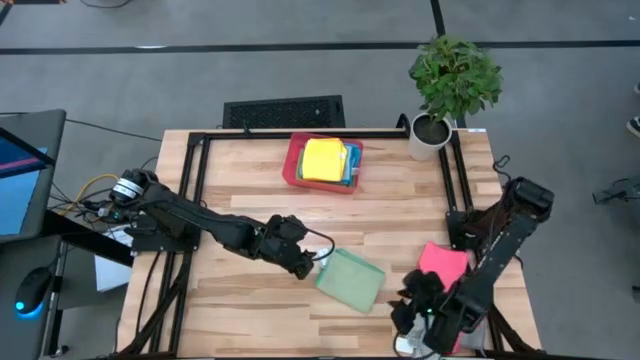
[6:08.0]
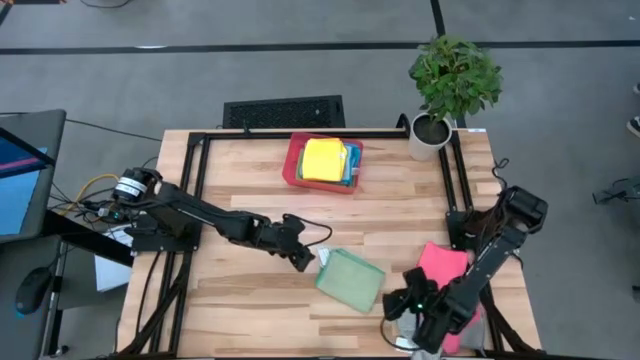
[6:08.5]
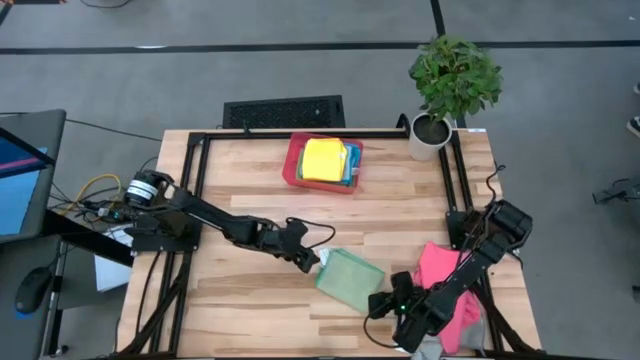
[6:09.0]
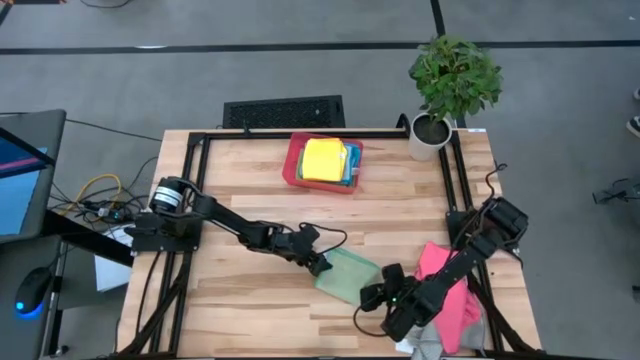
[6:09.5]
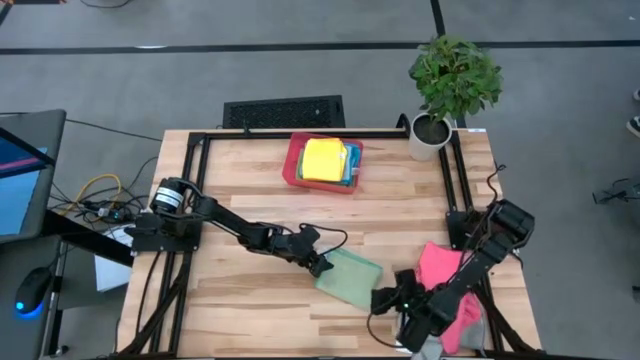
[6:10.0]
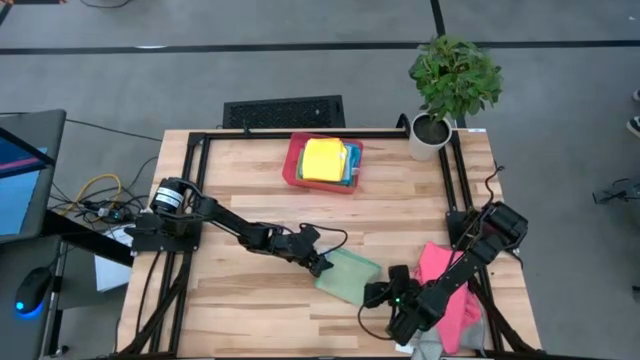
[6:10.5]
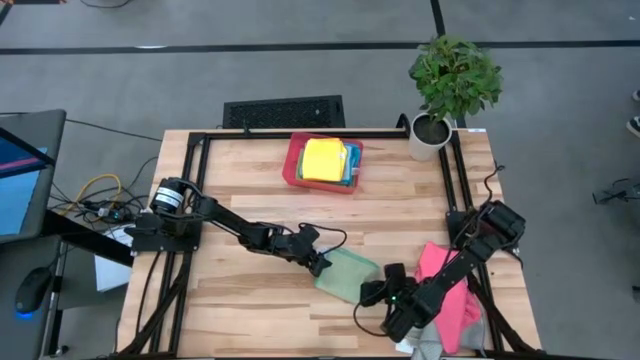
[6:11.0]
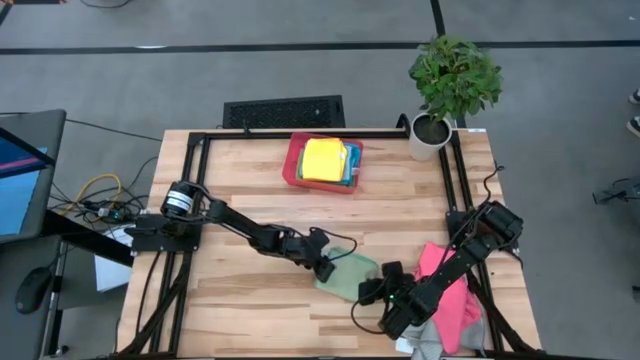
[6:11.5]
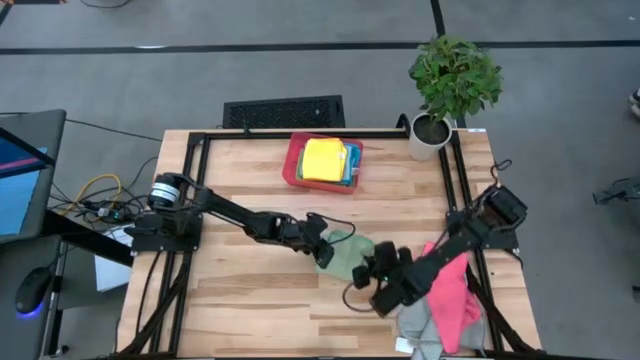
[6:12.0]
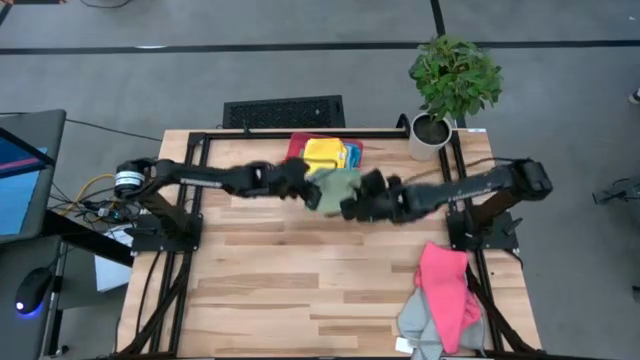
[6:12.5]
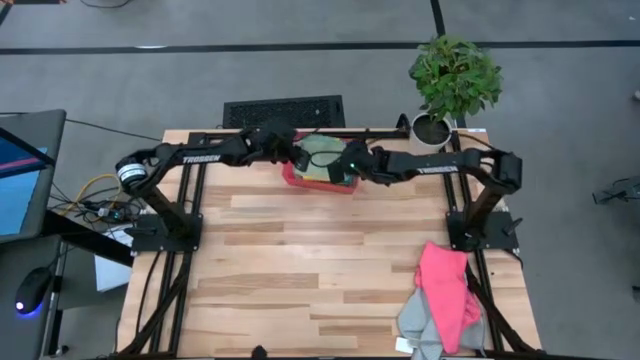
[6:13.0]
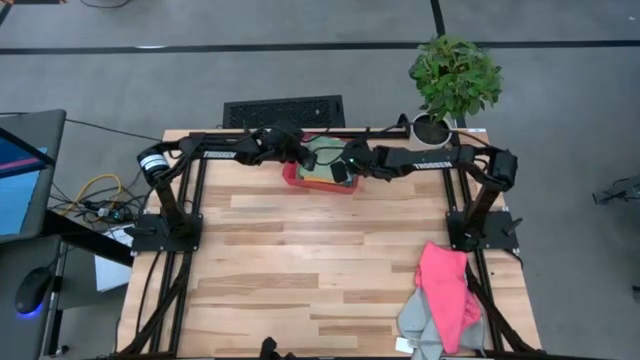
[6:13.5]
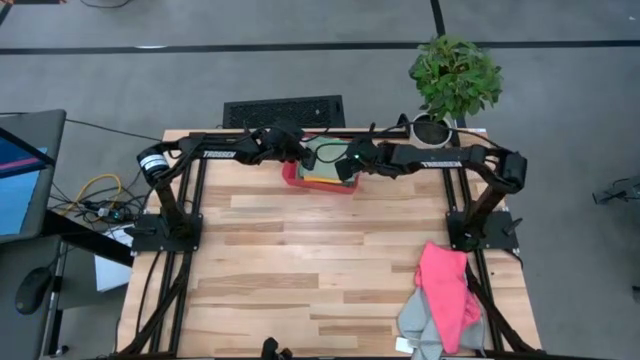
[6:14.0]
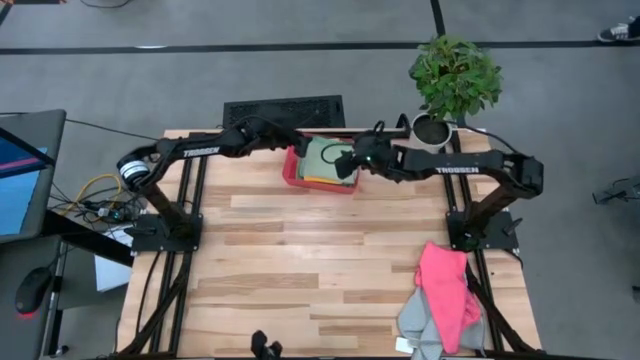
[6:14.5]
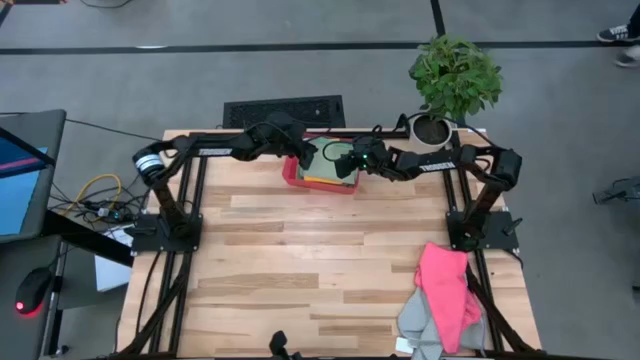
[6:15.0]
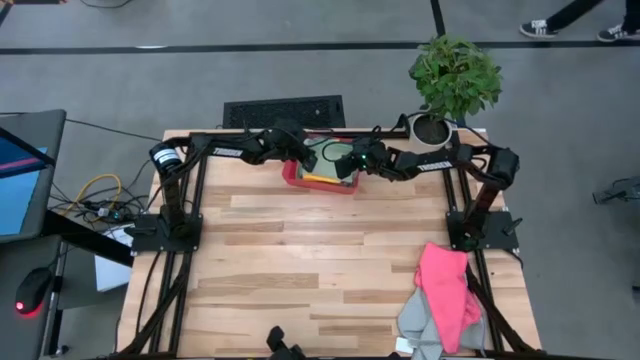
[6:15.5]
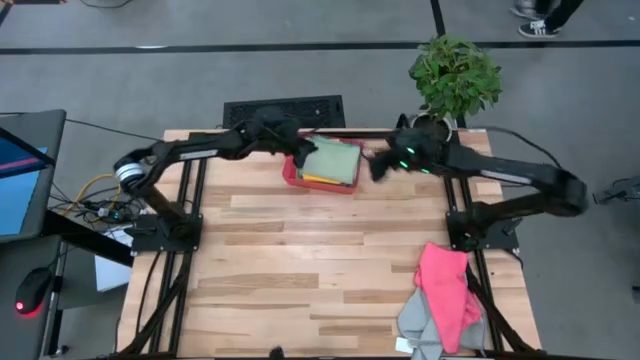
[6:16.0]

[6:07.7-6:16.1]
Task: Fold microfiber towels
Stack the green microfiber cloth on top of the yellow microfiber cloth in the red bin

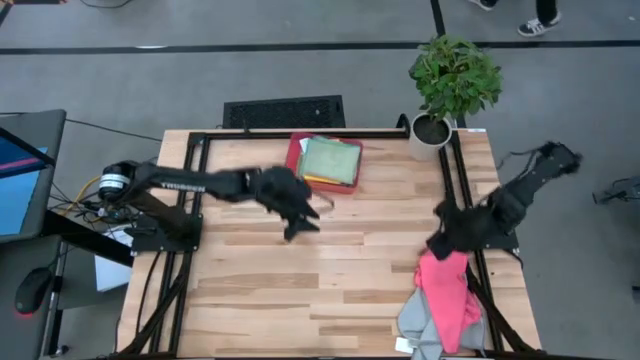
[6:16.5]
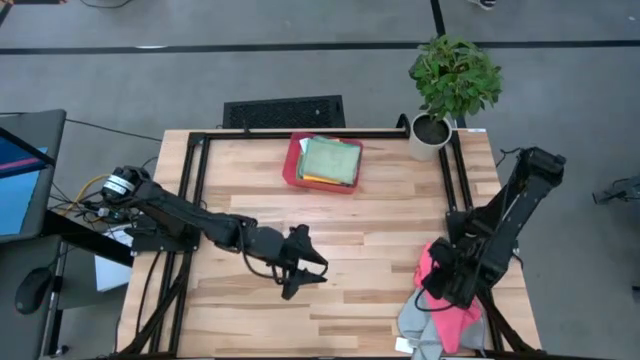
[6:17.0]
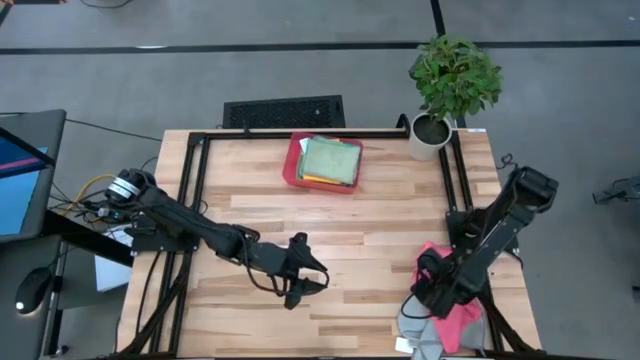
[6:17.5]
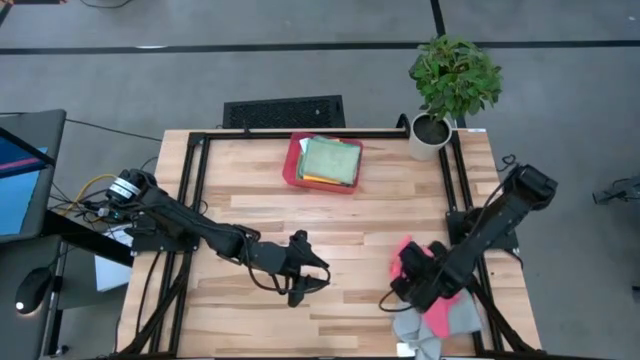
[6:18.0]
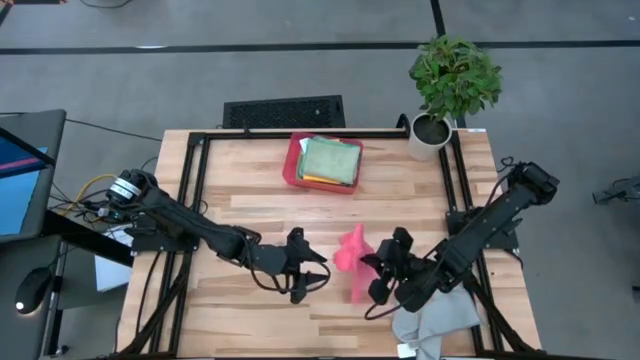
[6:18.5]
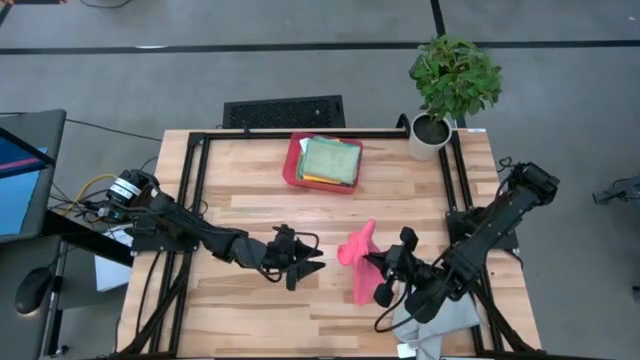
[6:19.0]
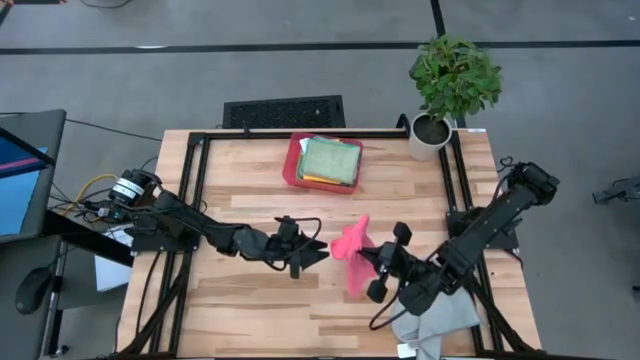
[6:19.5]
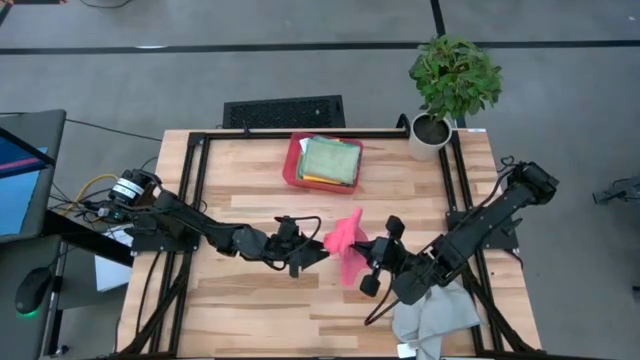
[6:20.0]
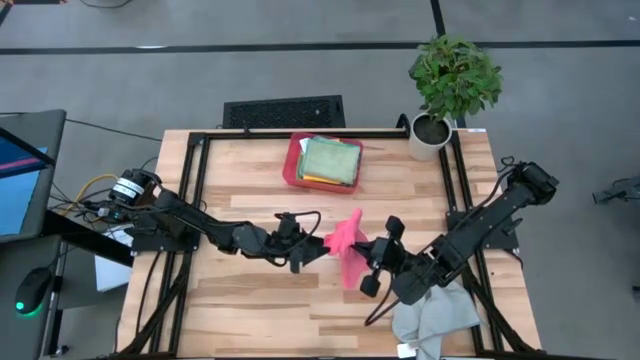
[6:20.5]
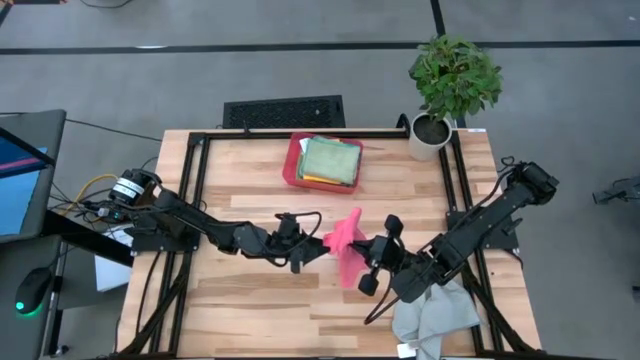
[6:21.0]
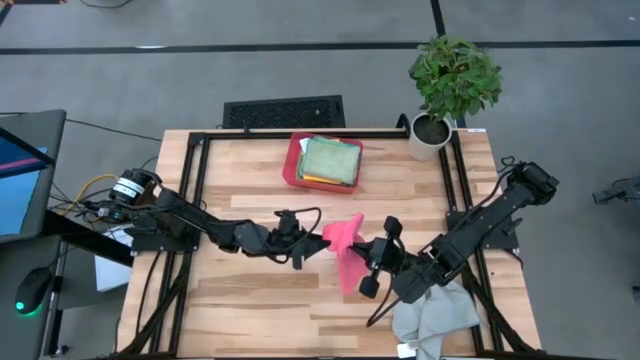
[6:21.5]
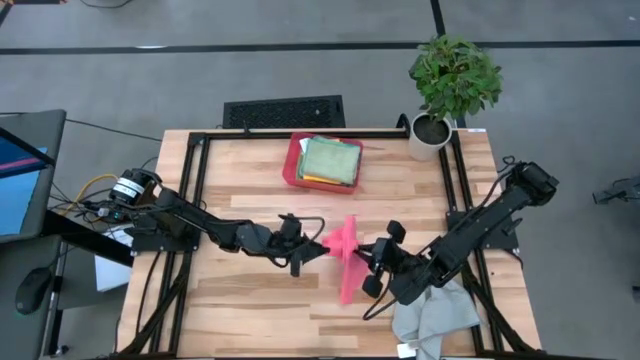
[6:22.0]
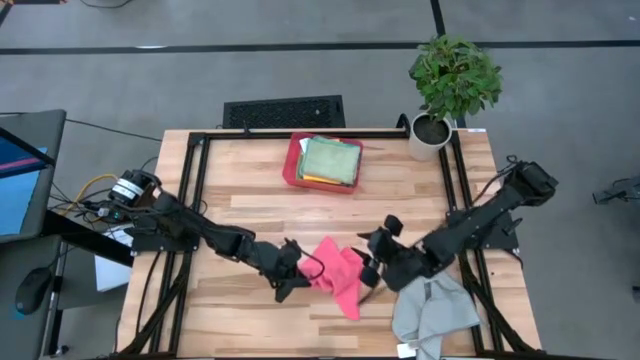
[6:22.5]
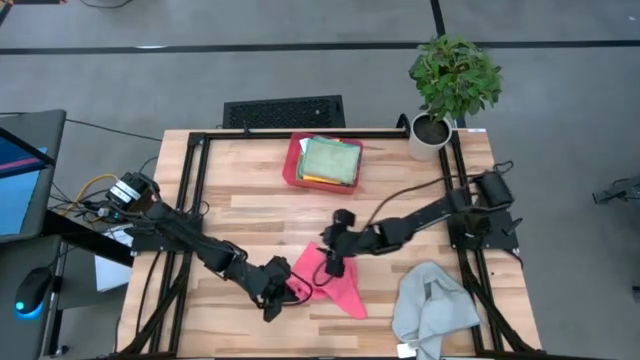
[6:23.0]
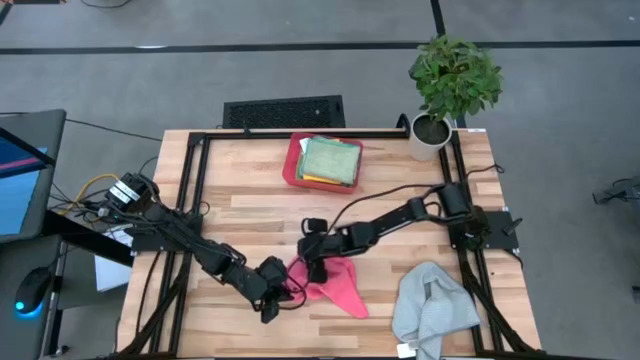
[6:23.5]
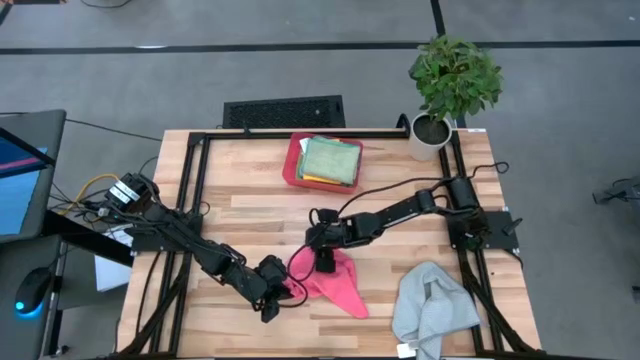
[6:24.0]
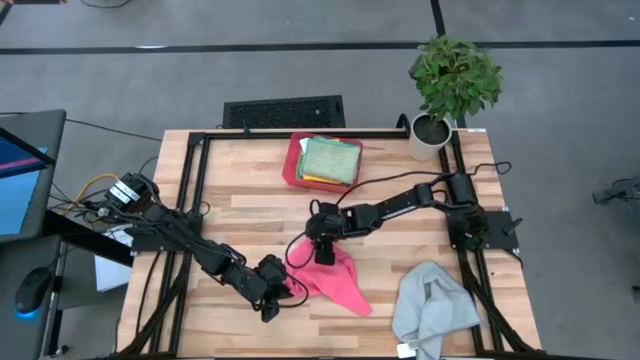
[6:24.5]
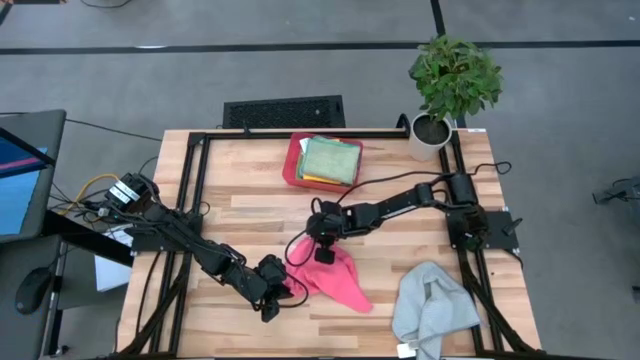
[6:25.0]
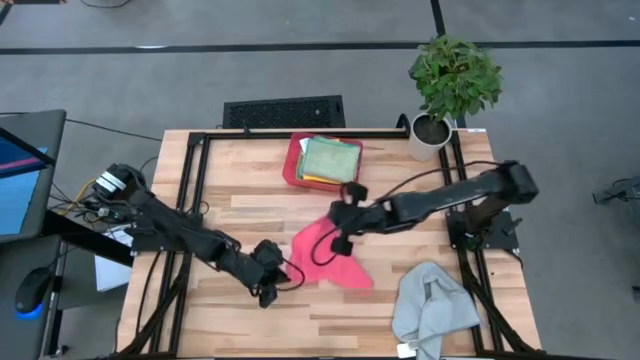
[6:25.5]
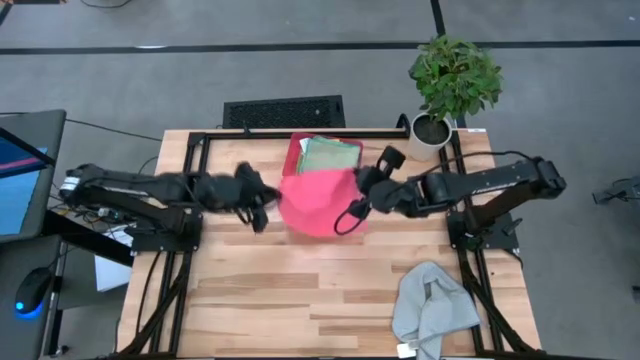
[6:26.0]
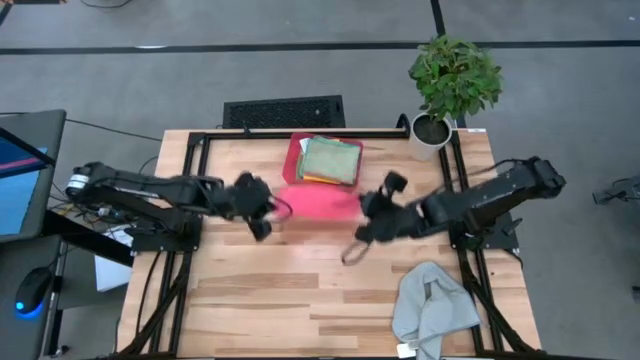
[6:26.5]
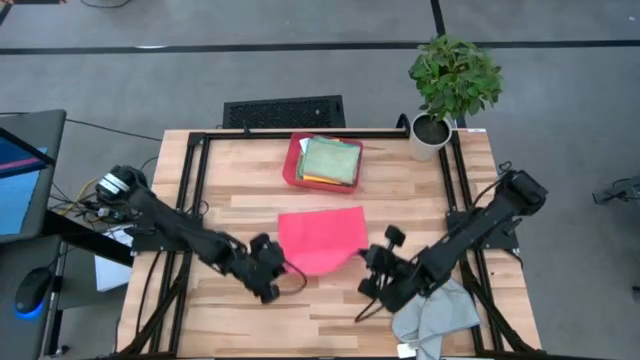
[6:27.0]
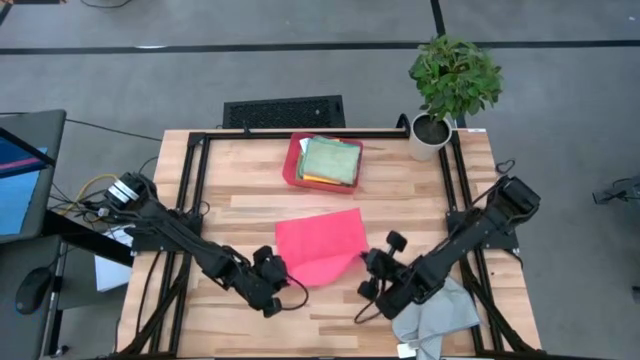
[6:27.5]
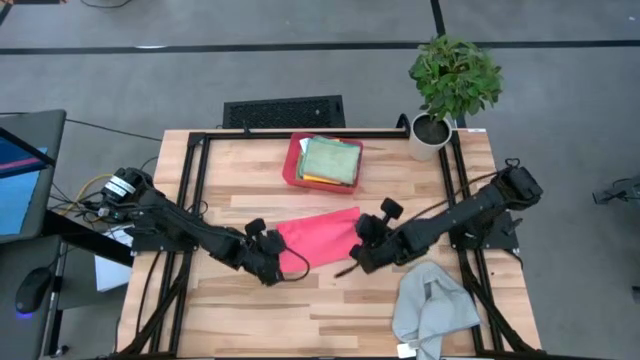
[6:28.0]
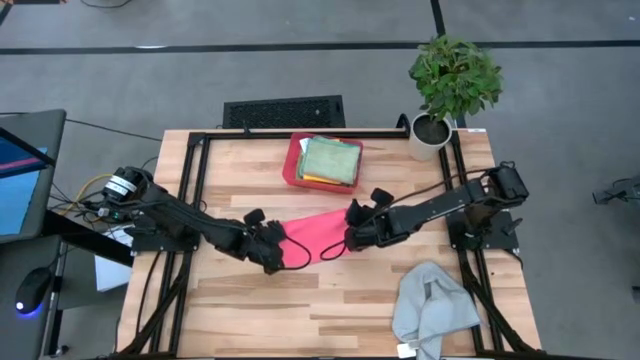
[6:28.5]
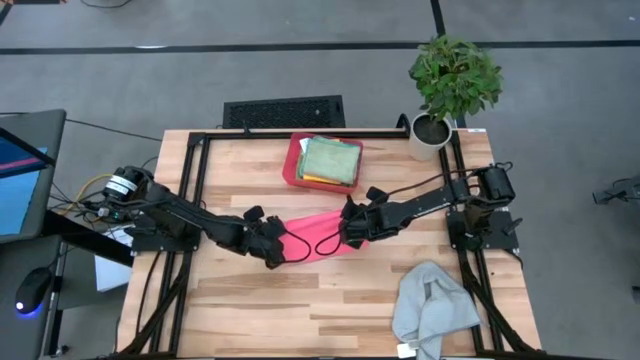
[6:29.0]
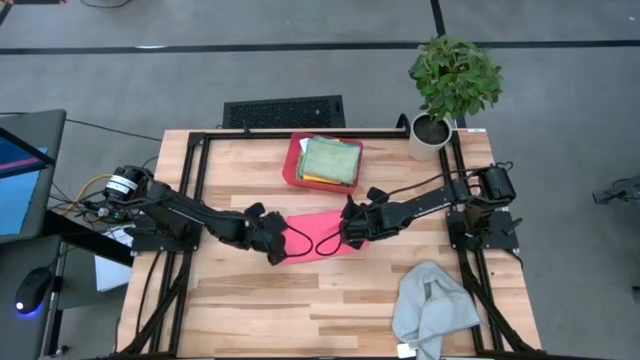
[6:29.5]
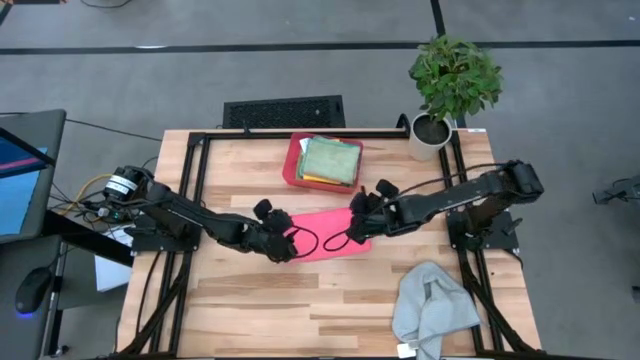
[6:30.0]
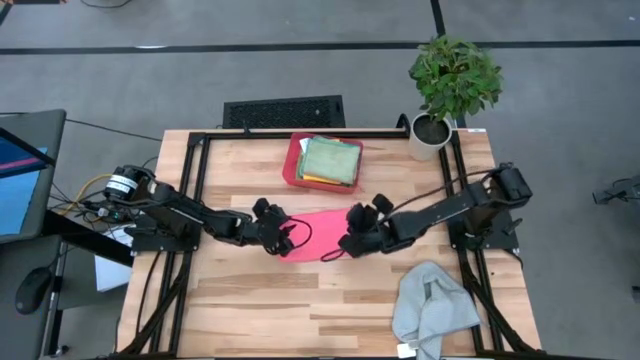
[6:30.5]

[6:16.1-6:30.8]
Fold the pink microfiber cloth
